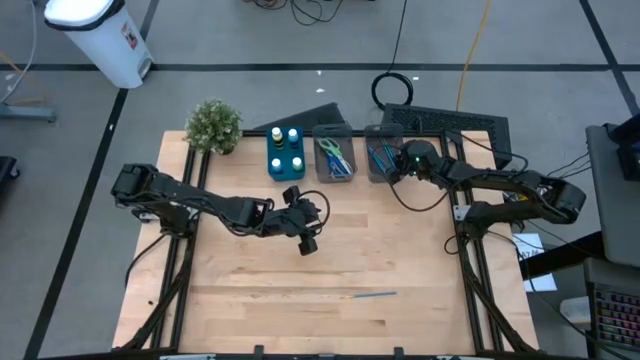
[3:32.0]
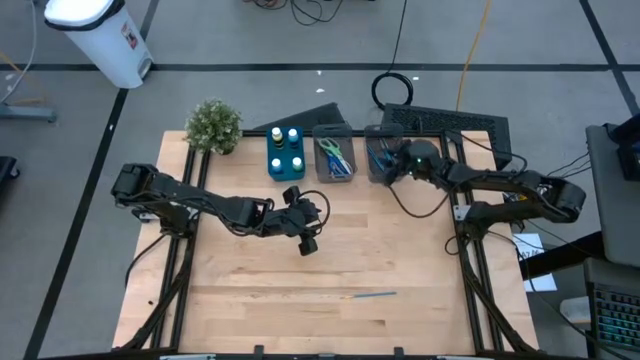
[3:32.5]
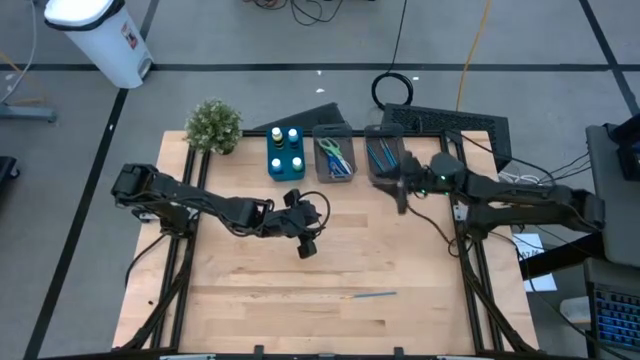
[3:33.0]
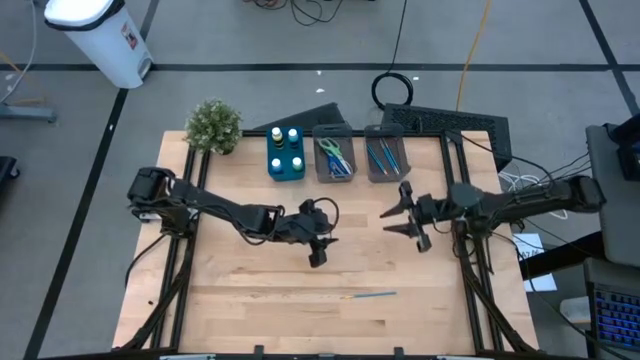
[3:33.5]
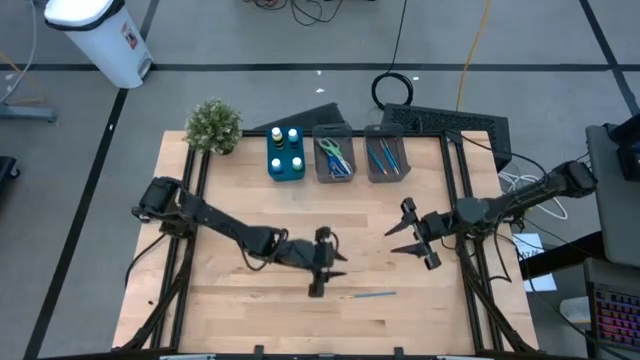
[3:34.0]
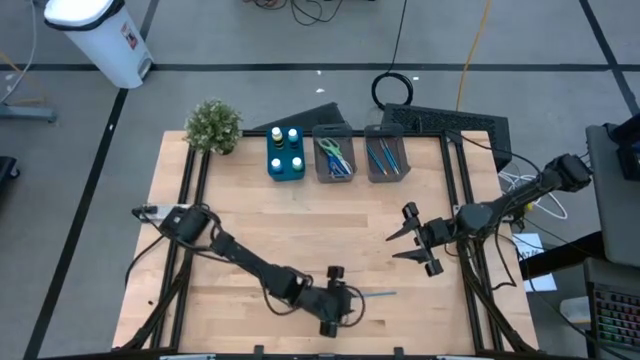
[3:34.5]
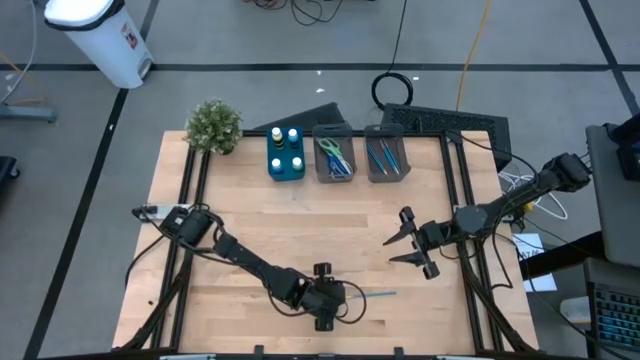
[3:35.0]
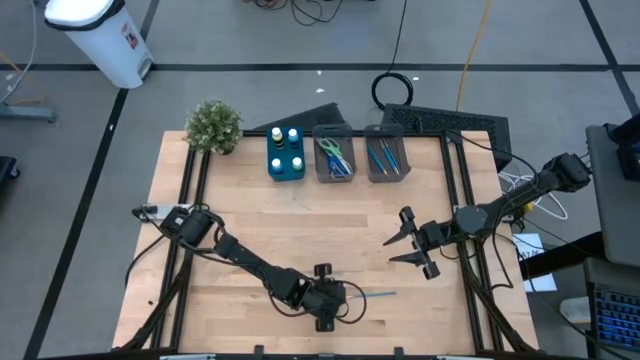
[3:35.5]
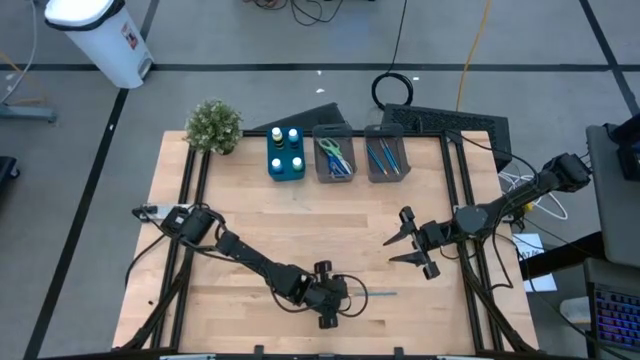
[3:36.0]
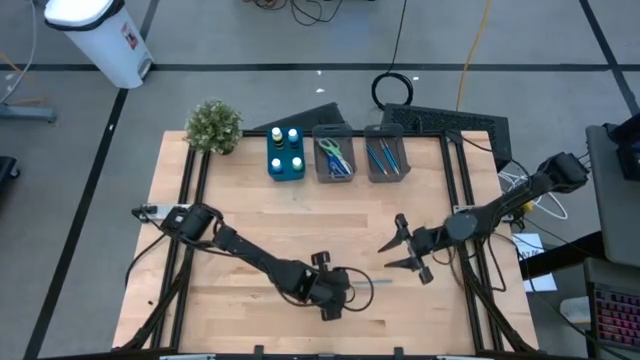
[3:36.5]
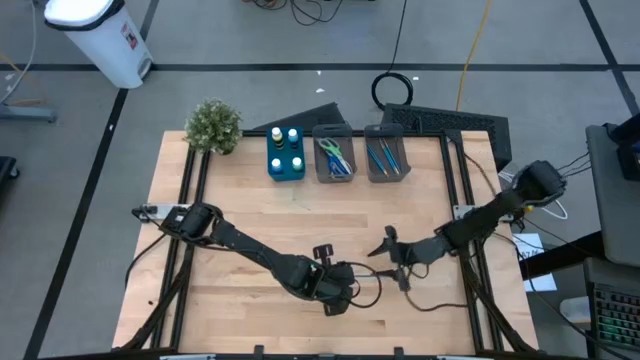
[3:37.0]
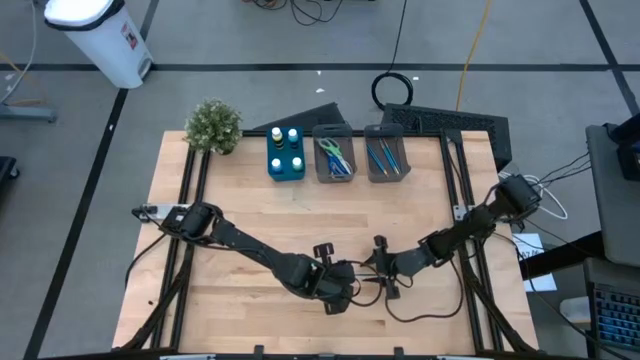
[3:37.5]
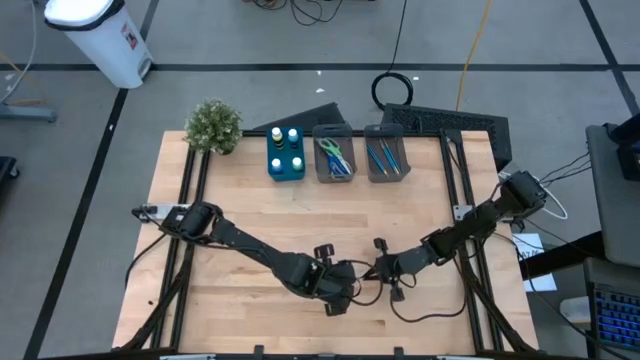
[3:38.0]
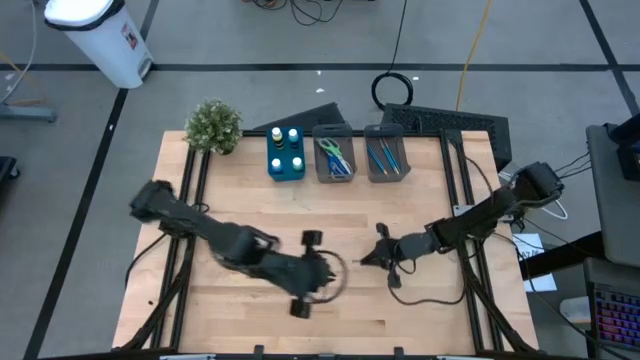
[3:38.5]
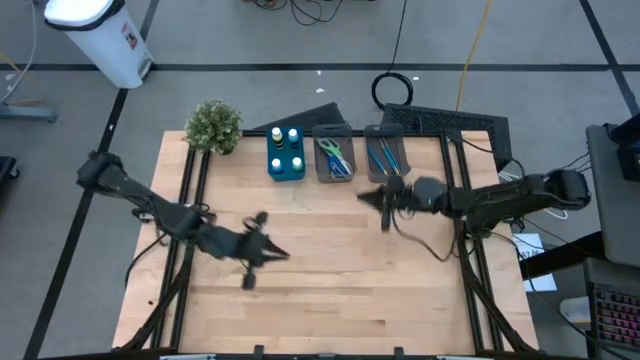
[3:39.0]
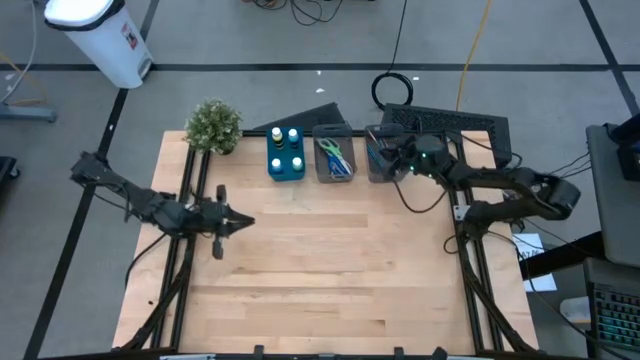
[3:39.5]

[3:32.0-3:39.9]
Task: Pick & Place Paint Supplies
Put the blue paint brush into the right black bin

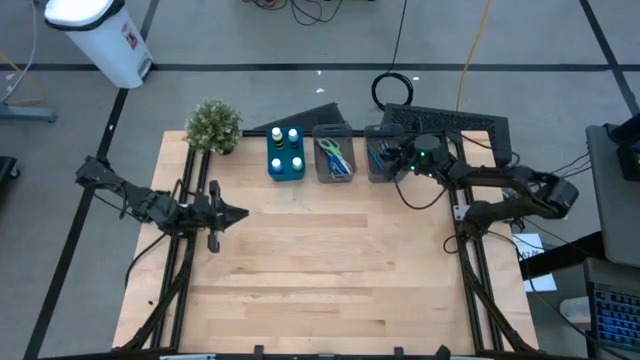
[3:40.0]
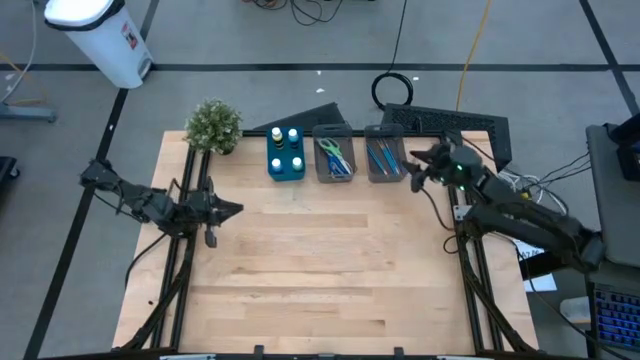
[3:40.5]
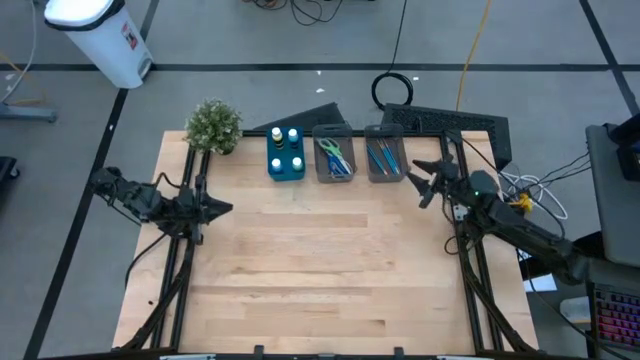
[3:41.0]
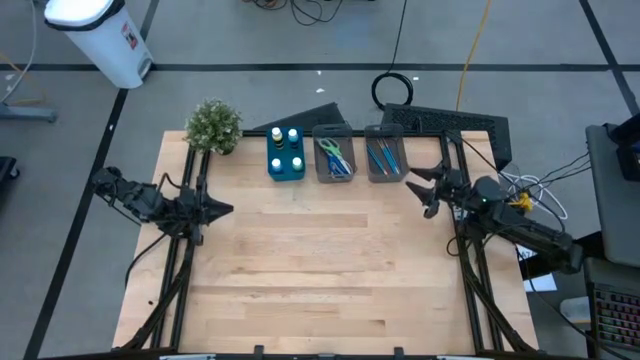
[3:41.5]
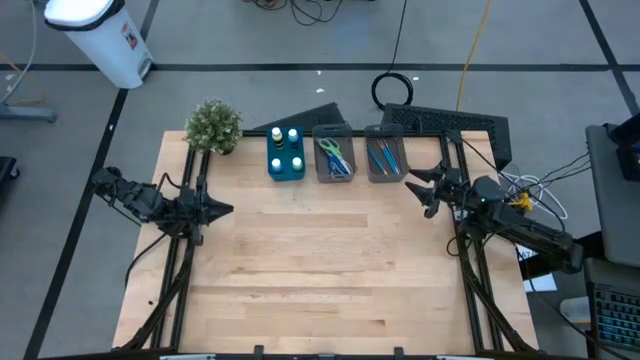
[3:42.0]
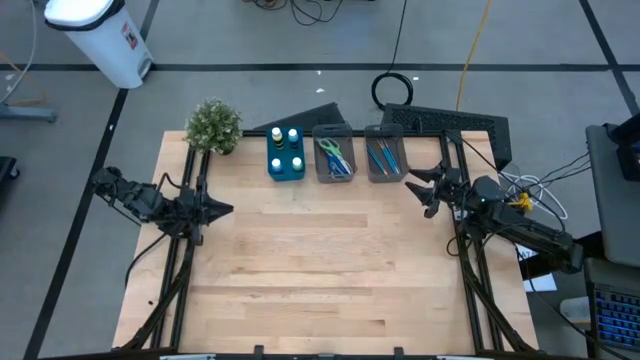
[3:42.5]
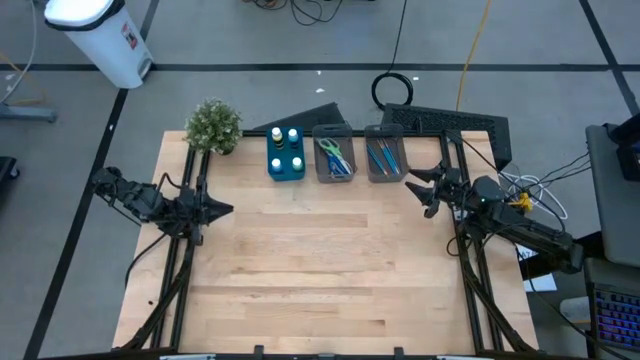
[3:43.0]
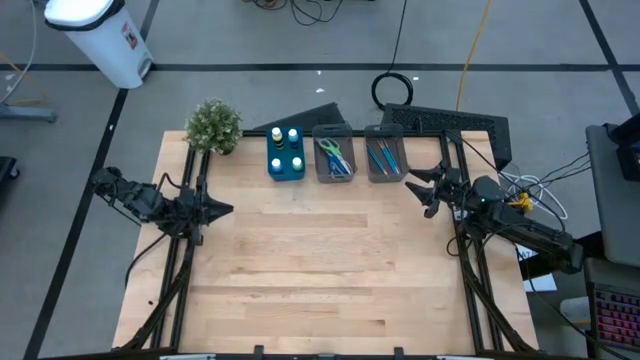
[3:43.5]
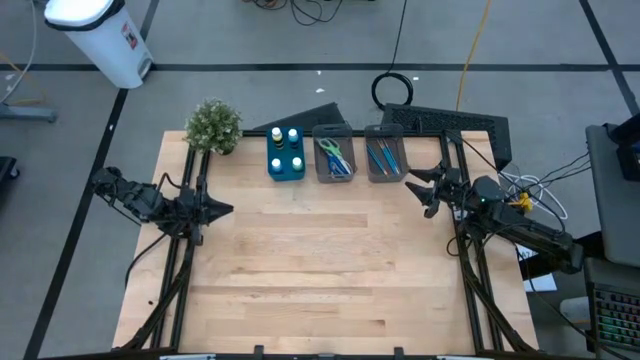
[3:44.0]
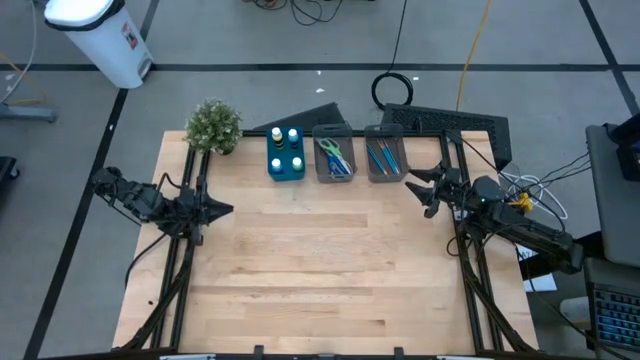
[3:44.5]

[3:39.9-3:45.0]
Return to Home Position

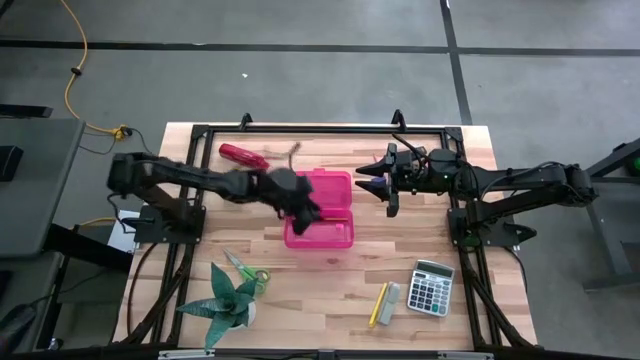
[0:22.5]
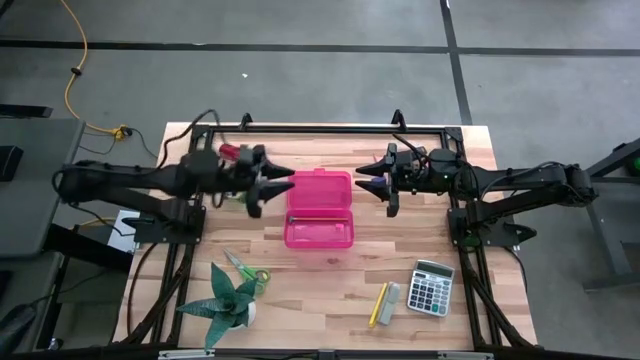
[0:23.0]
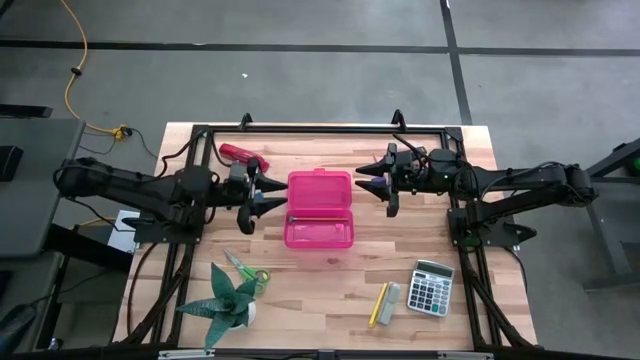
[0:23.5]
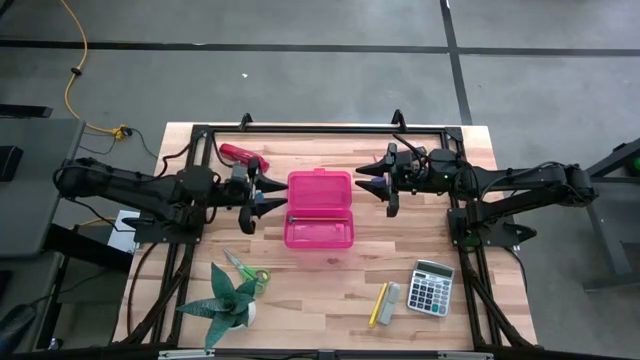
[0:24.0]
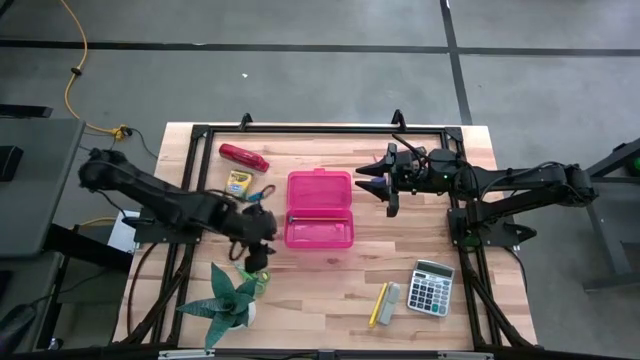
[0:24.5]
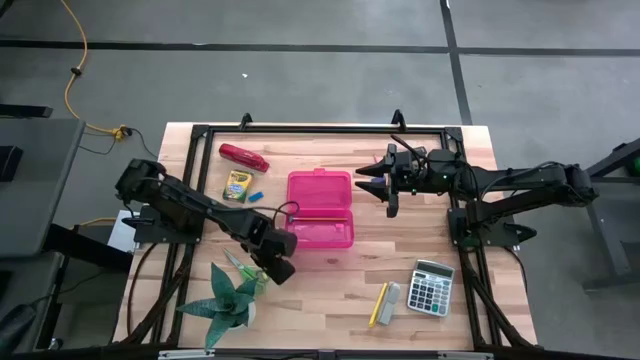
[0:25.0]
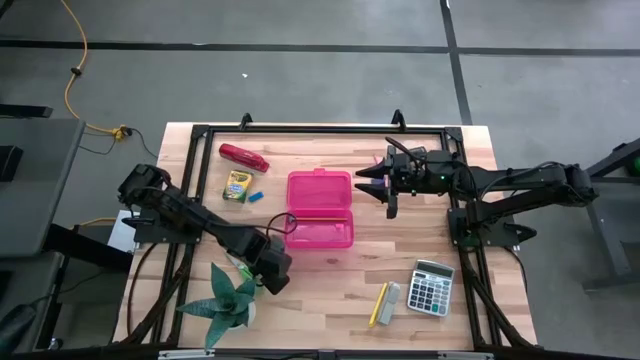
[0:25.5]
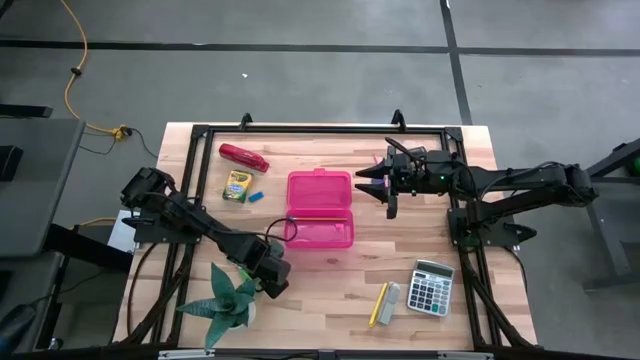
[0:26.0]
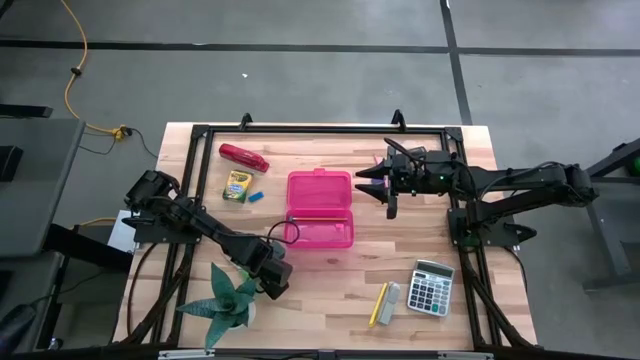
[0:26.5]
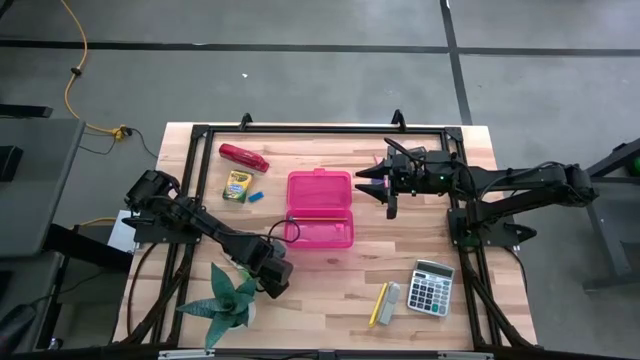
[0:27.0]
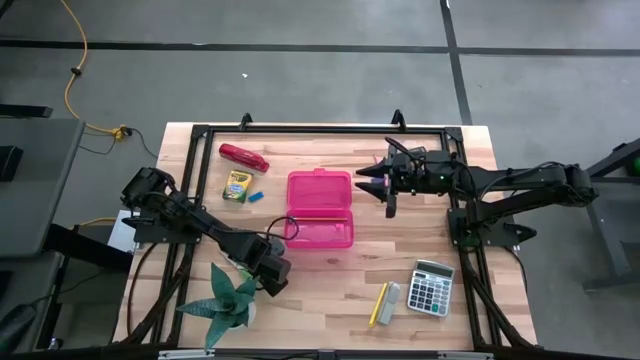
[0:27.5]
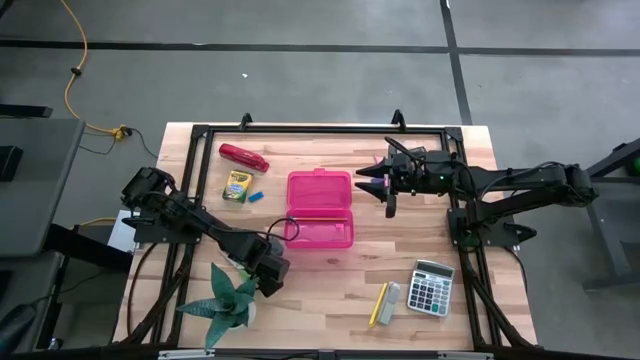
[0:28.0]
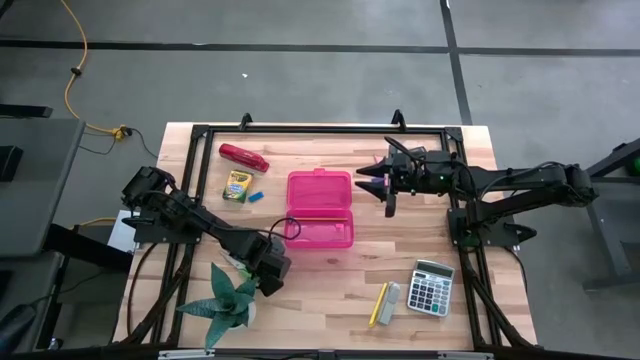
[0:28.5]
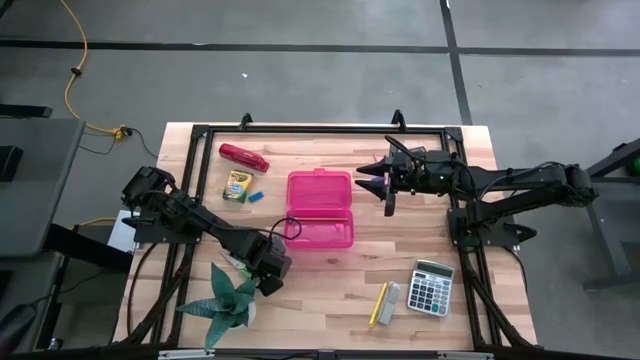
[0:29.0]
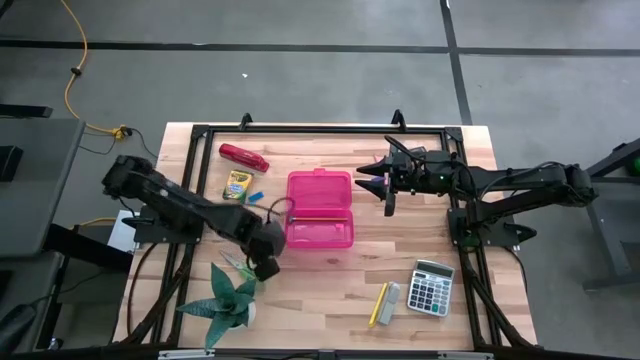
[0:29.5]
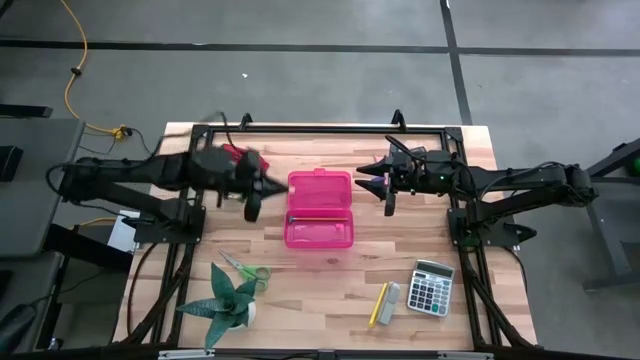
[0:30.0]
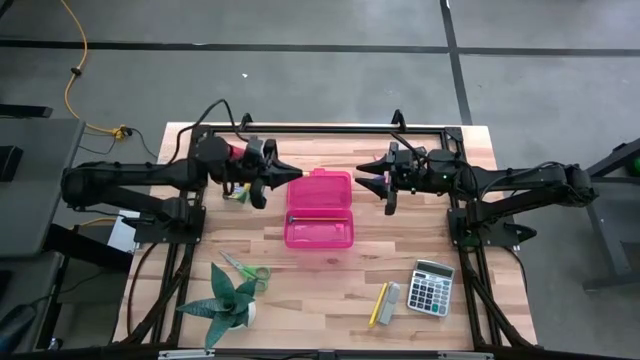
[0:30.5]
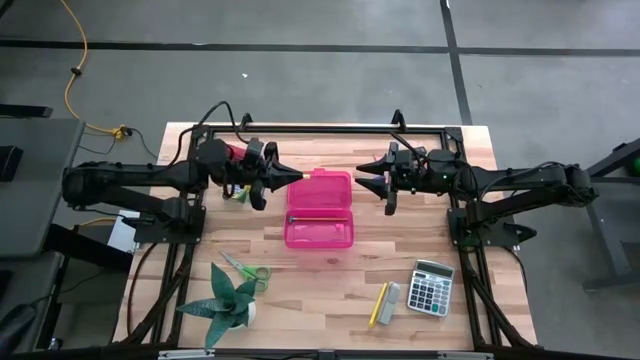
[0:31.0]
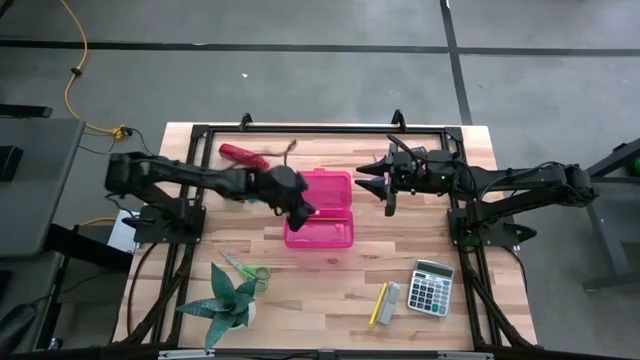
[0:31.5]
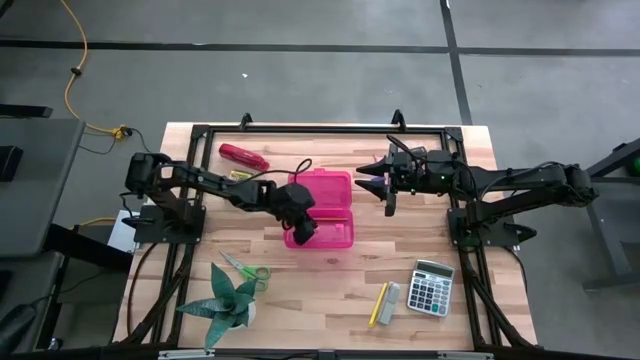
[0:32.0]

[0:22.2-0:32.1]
Task: Pack school essentials
Put the yellow eraser into the pink supply box
